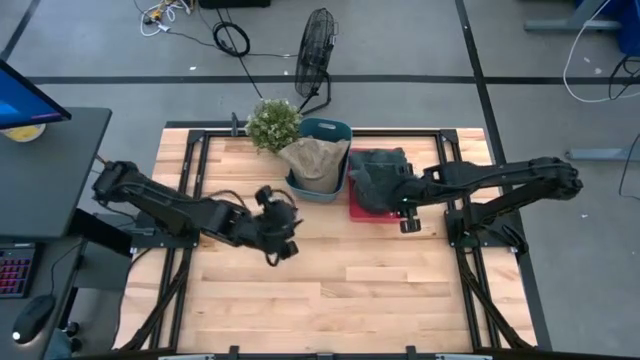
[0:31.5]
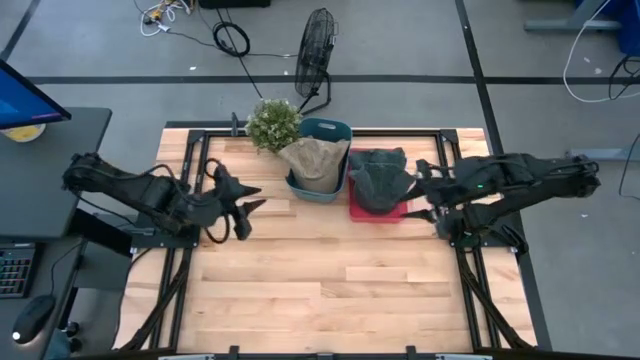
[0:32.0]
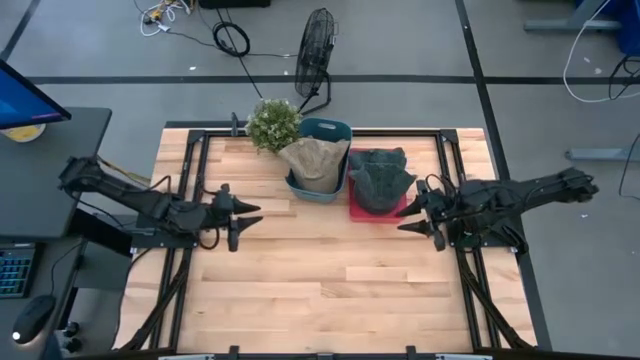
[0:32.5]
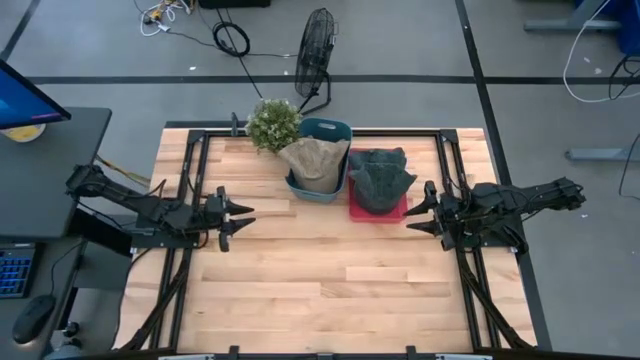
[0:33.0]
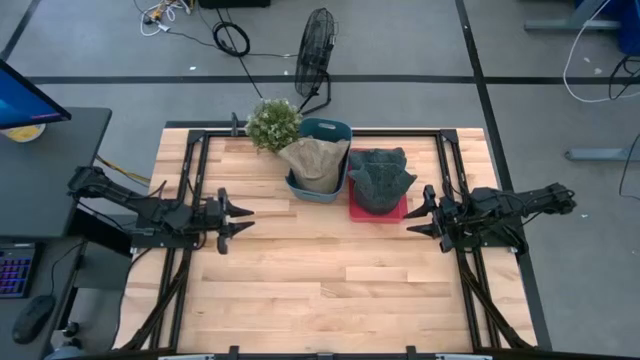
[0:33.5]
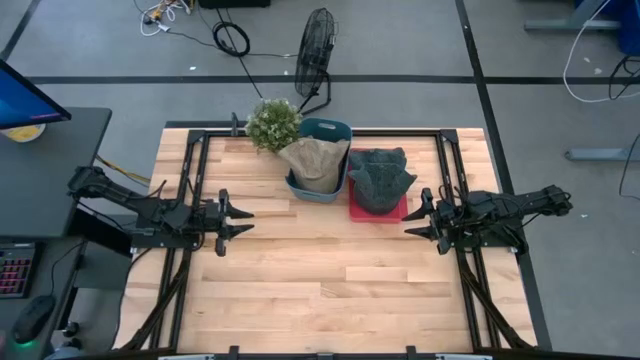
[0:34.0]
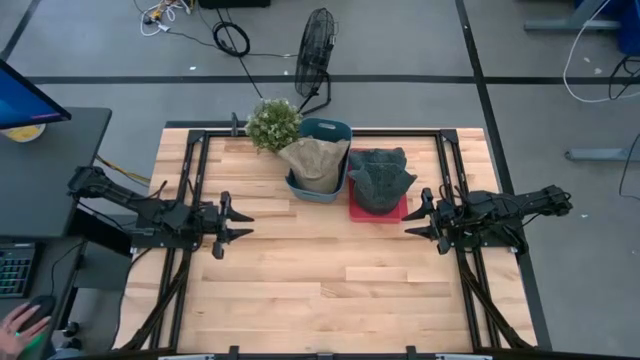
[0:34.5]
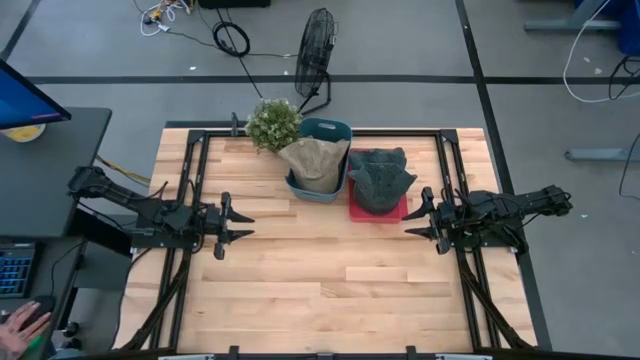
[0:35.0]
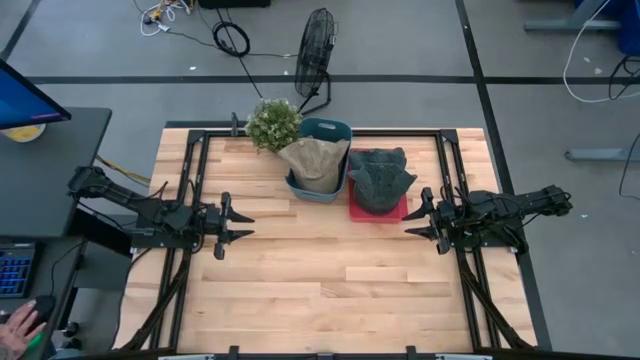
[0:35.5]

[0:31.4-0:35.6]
Task: Pick & Place hat
Return to Home Position

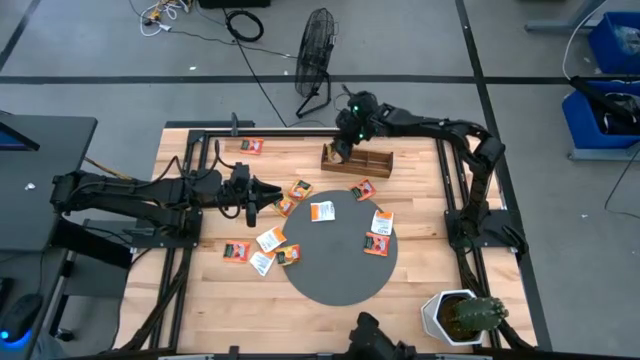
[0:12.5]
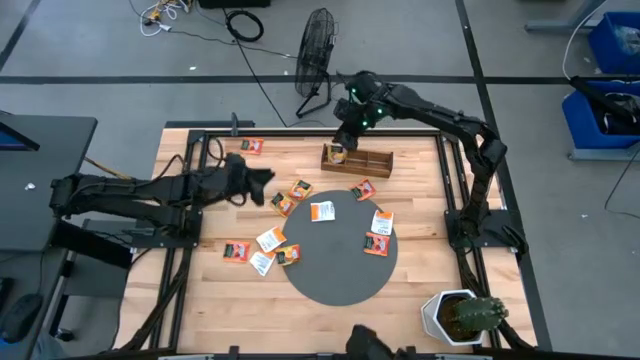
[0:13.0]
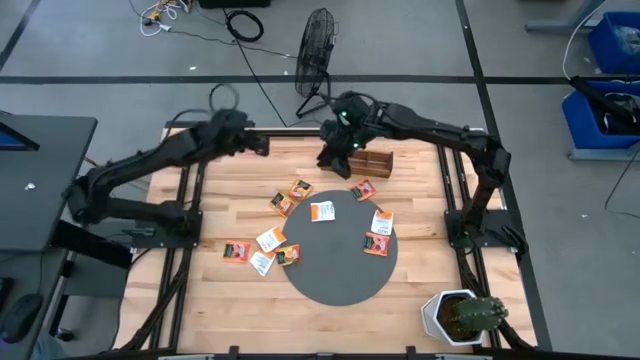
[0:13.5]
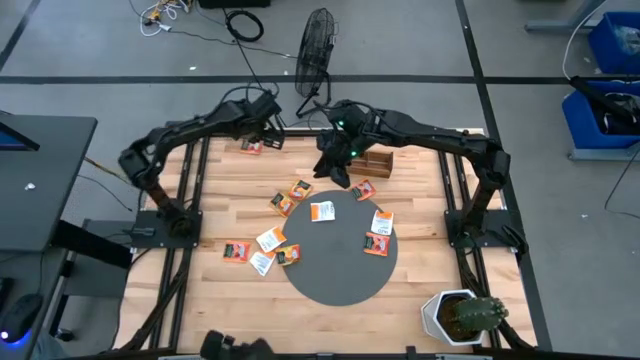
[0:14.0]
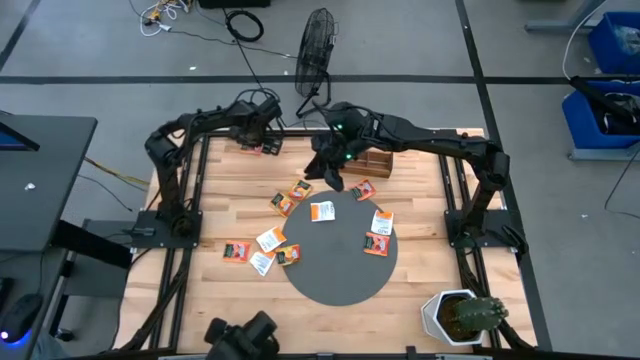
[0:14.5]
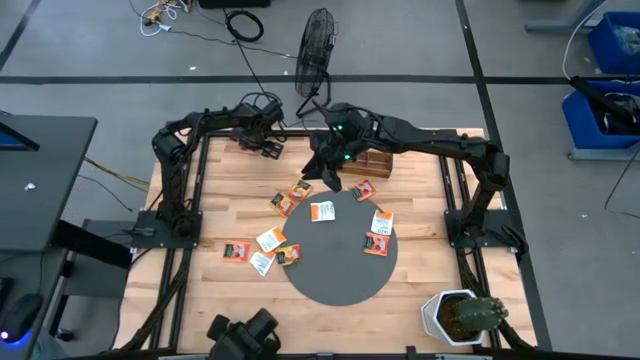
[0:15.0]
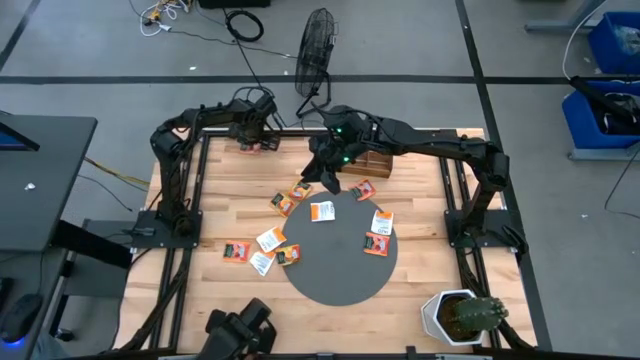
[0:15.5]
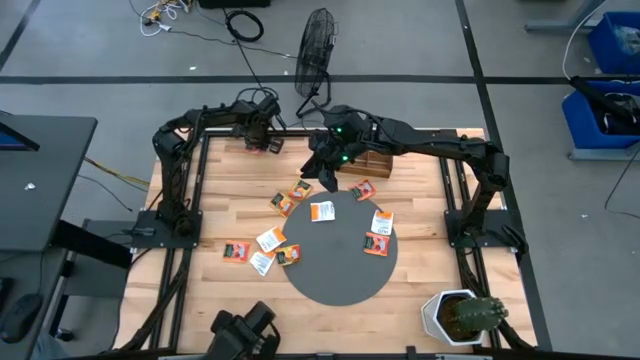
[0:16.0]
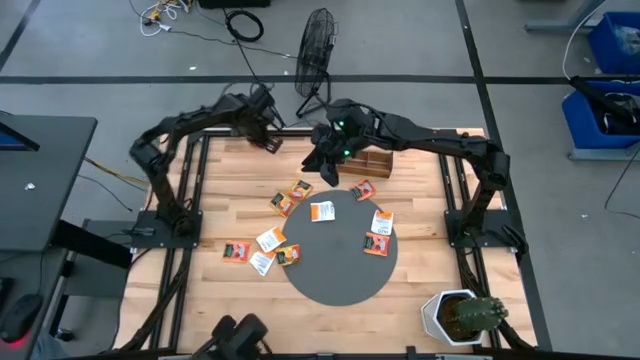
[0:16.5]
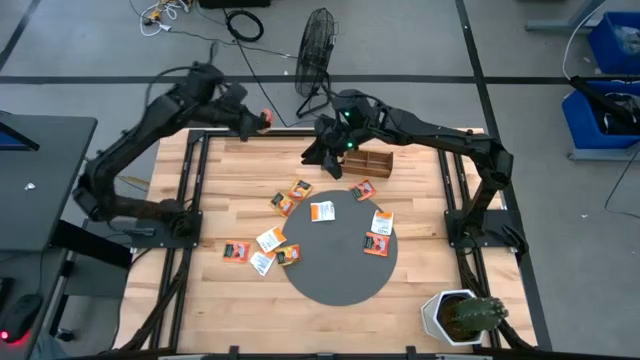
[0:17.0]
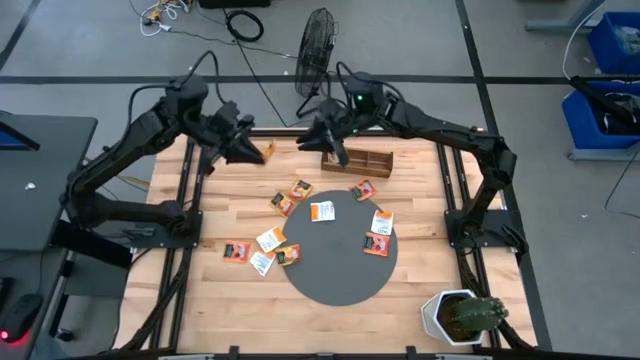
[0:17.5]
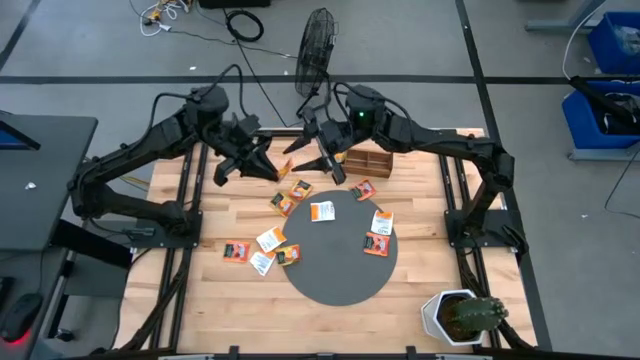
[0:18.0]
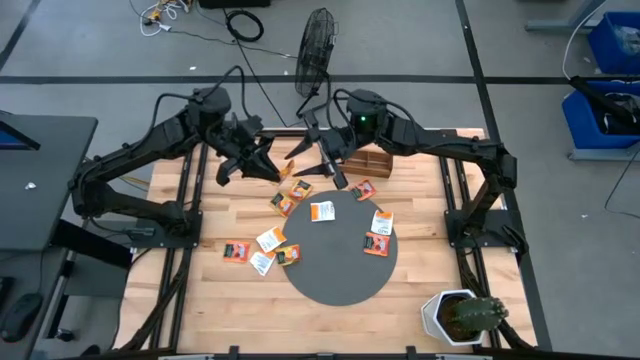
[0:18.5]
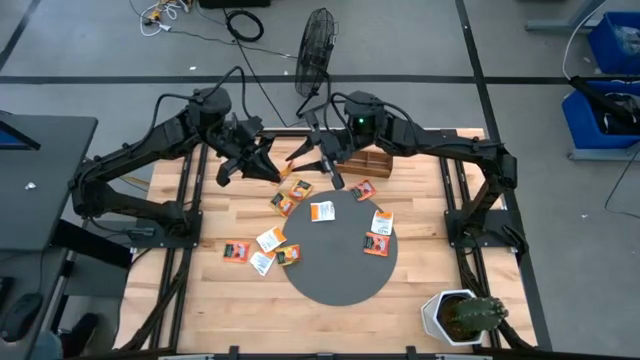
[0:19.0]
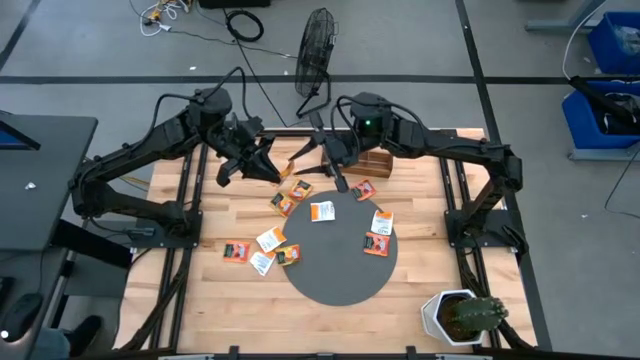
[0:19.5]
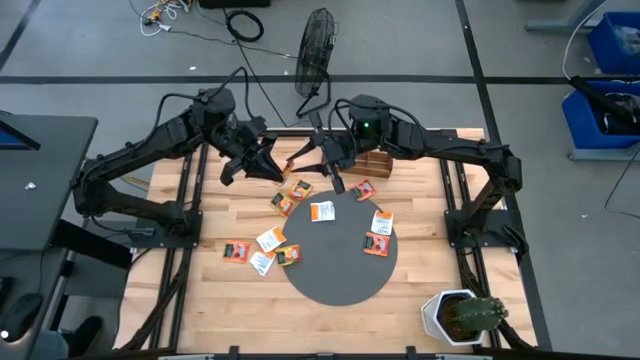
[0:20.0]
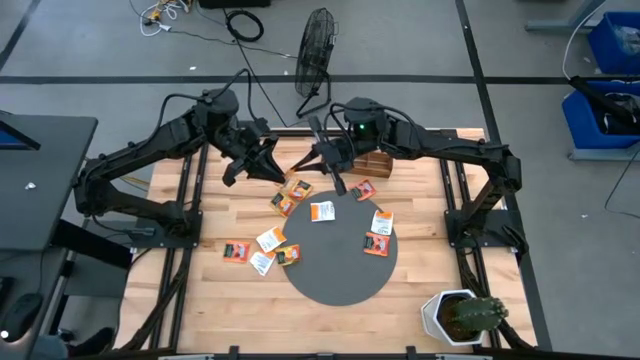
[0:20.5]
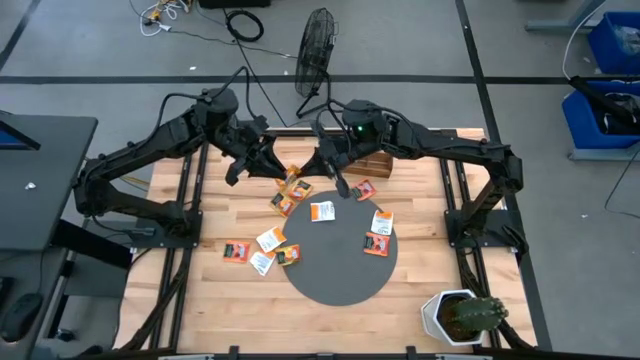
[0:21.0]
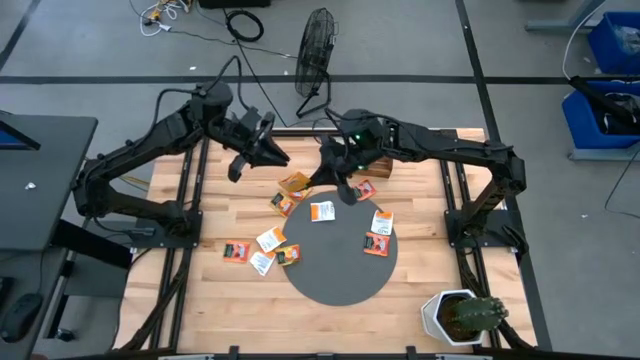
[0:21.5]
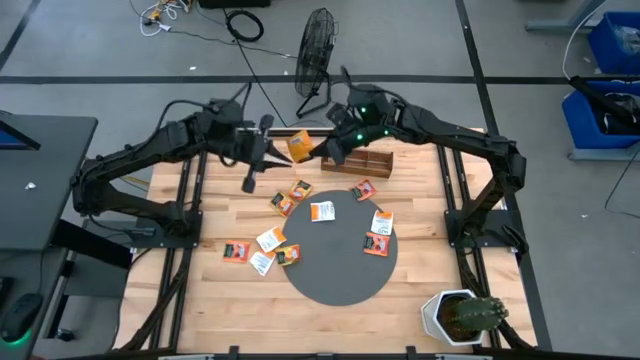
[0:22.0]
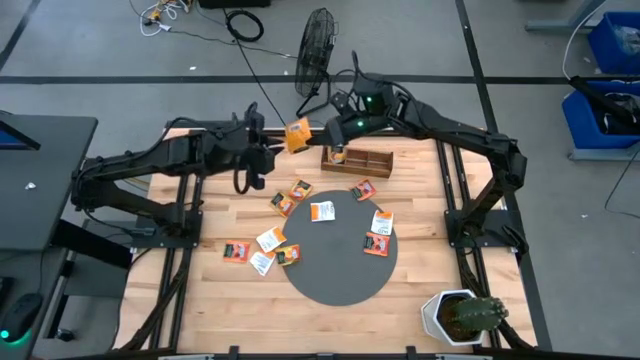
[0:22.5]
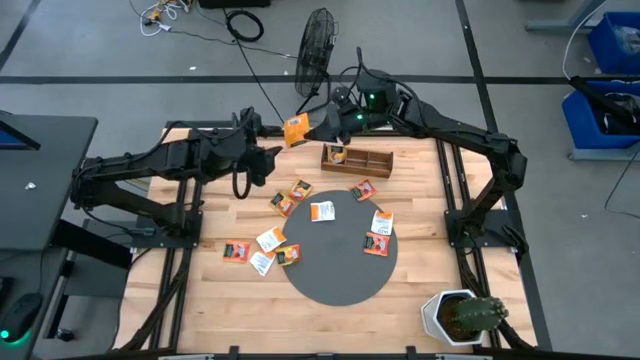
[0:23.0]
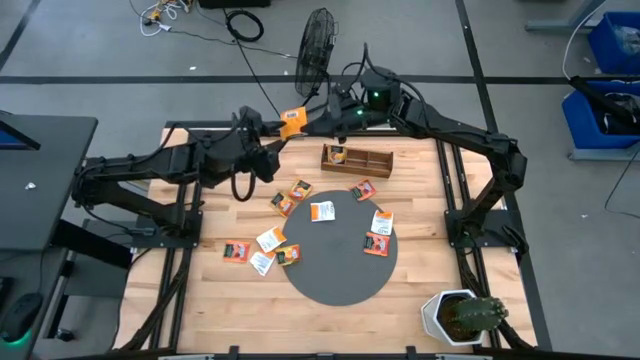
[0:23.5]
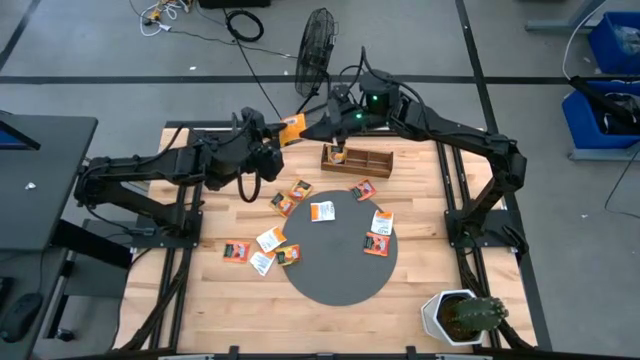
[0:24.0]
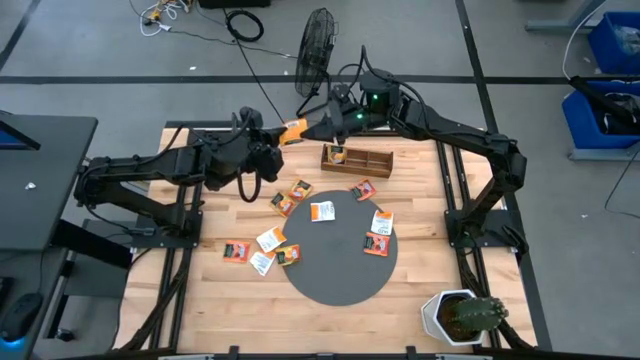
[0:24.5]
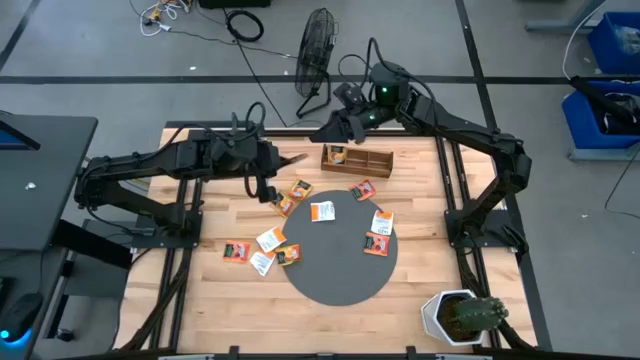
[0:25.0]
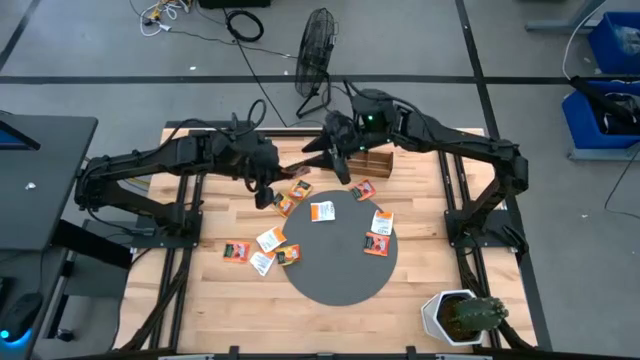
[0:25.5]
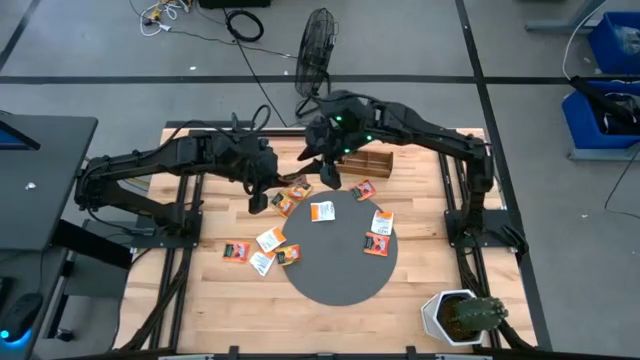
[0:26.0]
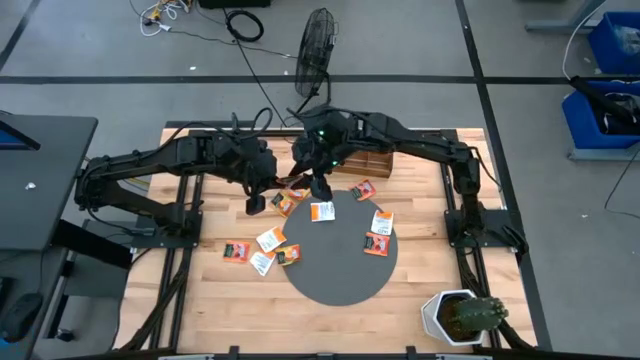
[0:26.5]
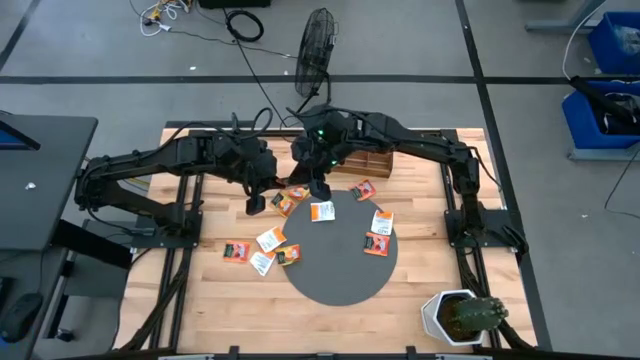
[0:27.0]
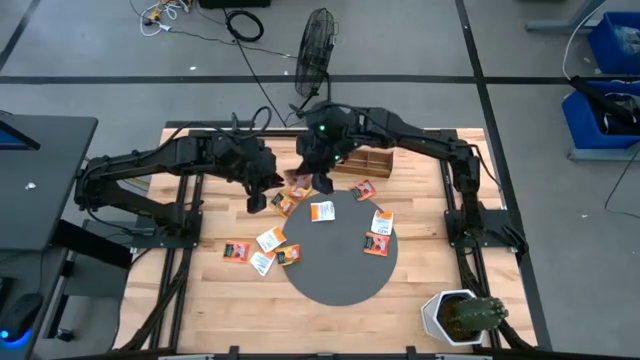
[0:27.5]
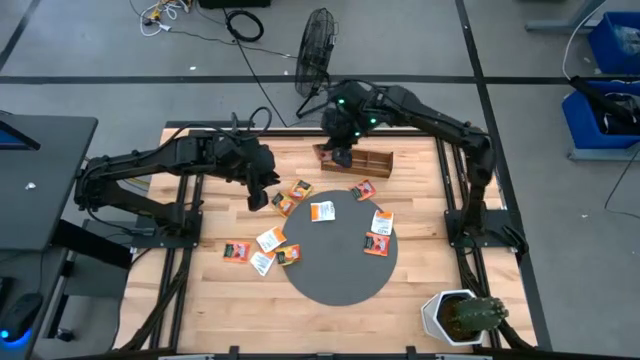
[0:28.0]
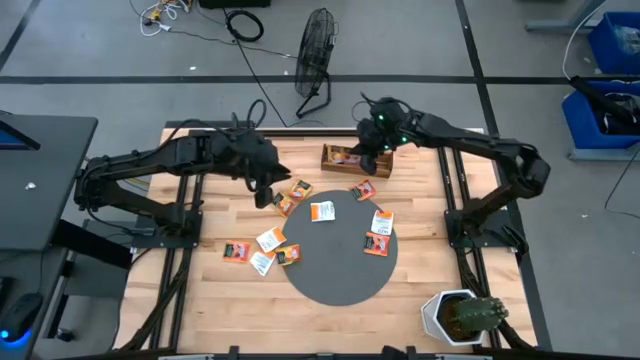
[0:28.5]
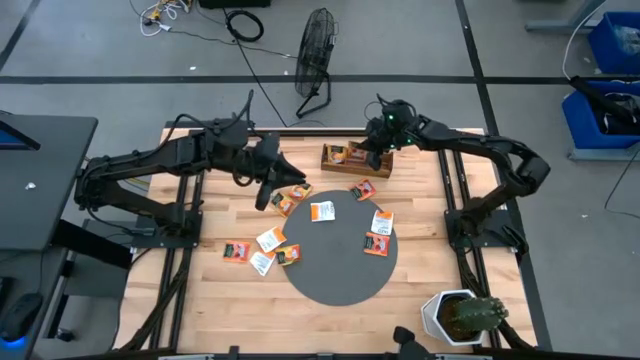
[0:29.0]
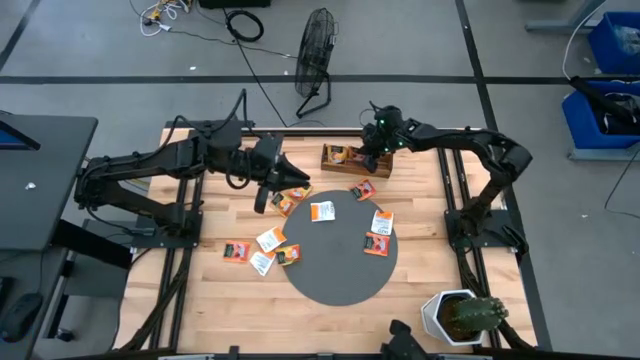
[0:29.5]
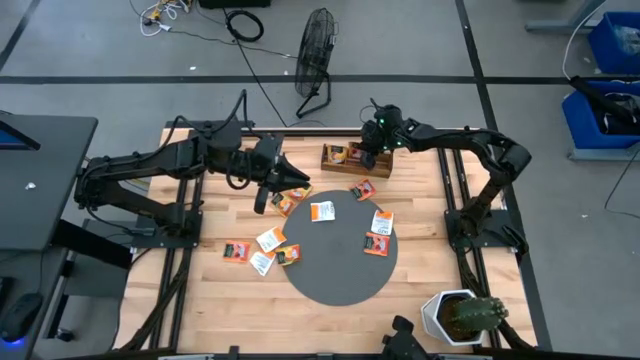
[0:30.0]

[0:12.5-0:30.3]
Task: Pick & Place Tea
Put the orange tea bag into the middle section of the wooden organizer
